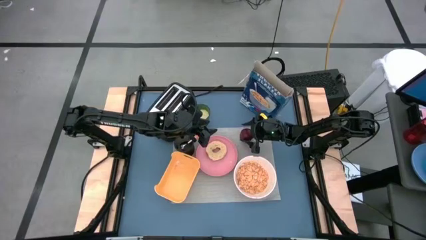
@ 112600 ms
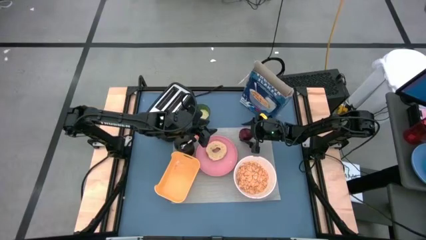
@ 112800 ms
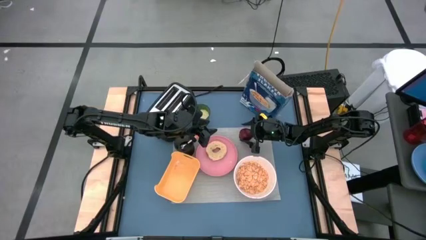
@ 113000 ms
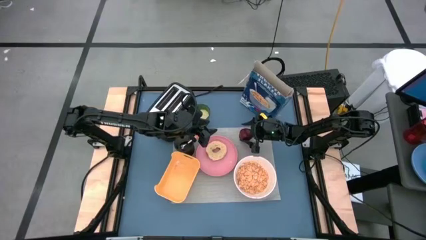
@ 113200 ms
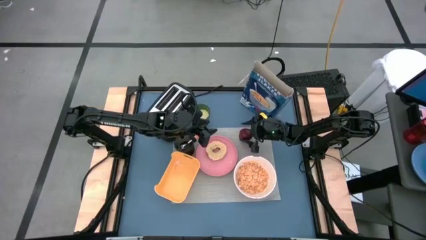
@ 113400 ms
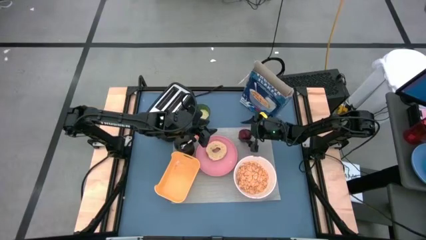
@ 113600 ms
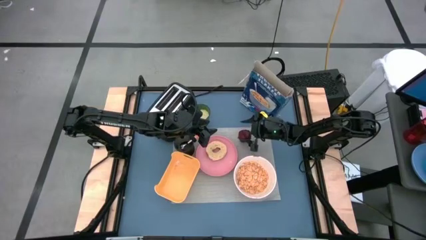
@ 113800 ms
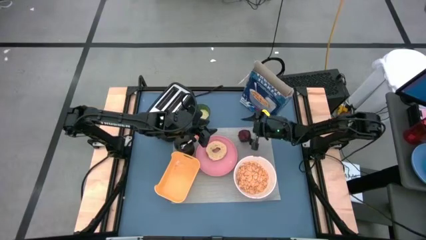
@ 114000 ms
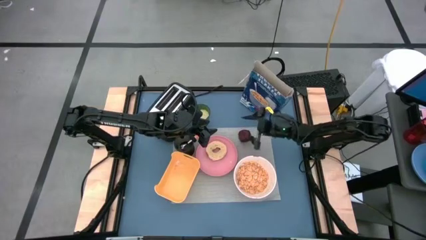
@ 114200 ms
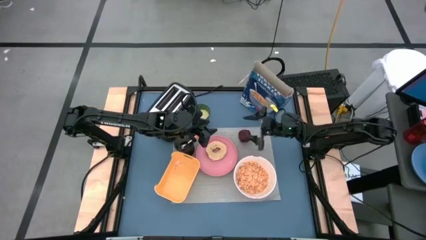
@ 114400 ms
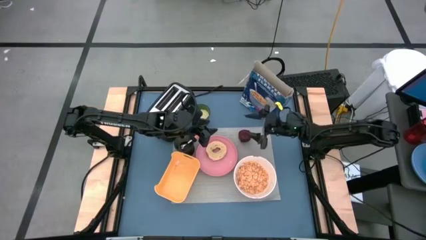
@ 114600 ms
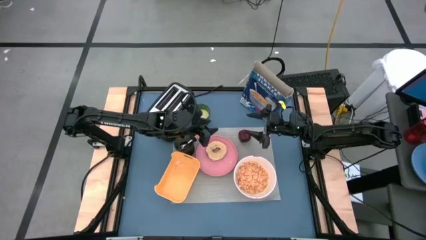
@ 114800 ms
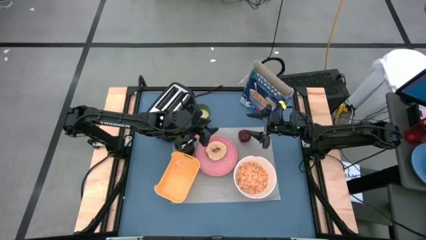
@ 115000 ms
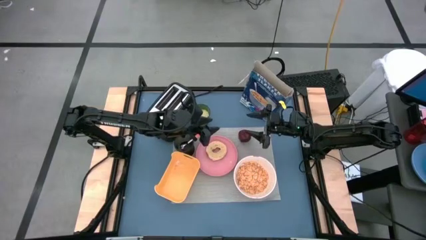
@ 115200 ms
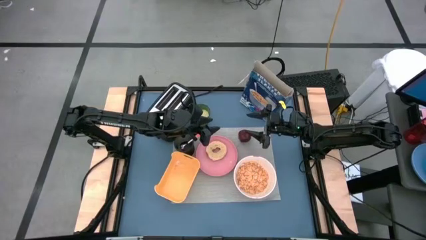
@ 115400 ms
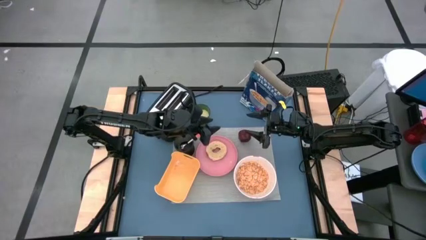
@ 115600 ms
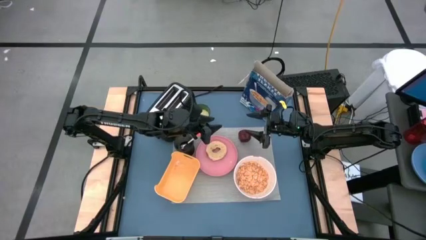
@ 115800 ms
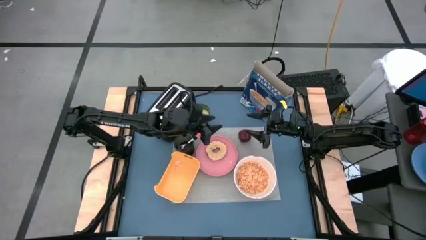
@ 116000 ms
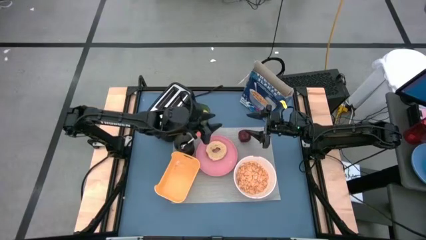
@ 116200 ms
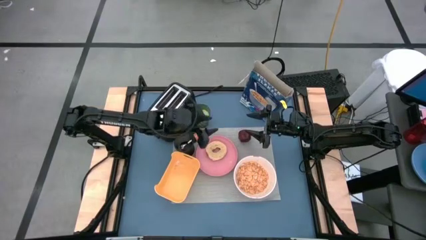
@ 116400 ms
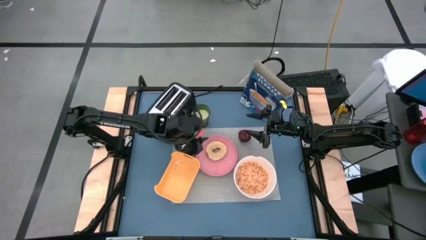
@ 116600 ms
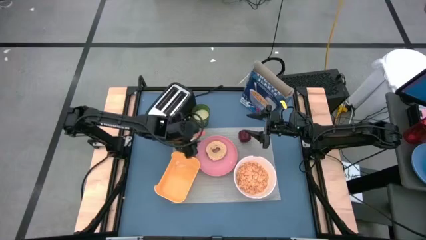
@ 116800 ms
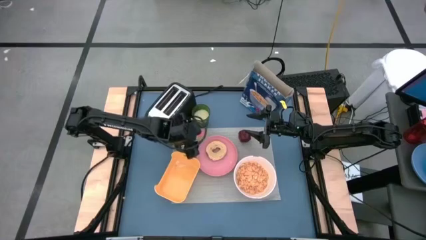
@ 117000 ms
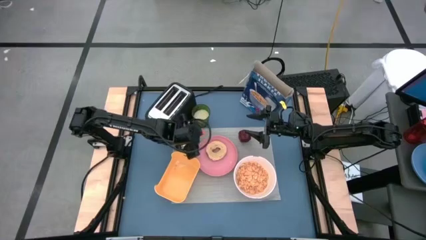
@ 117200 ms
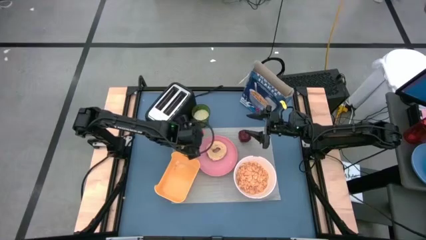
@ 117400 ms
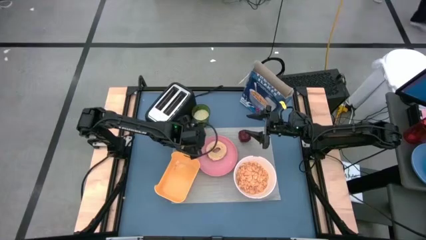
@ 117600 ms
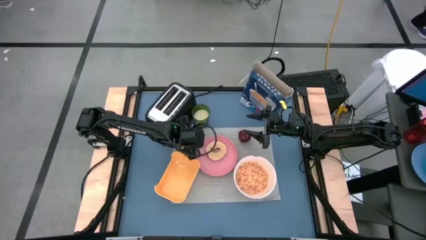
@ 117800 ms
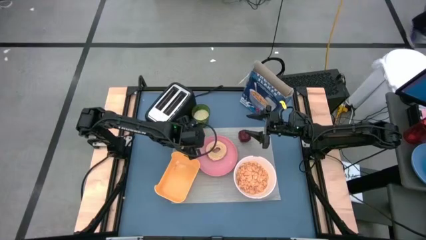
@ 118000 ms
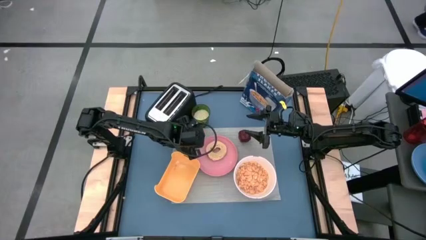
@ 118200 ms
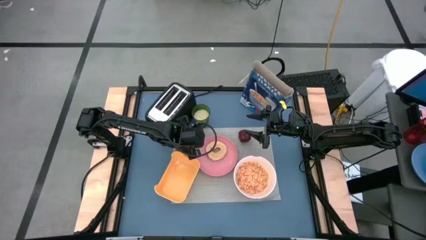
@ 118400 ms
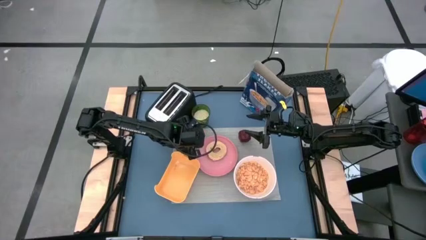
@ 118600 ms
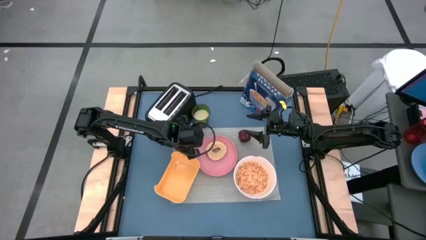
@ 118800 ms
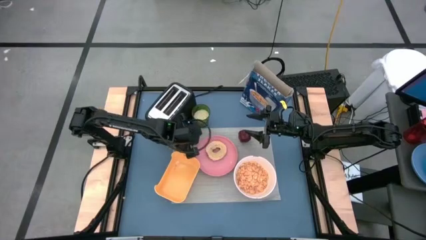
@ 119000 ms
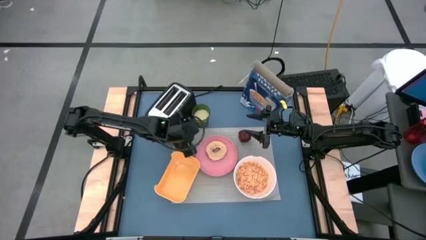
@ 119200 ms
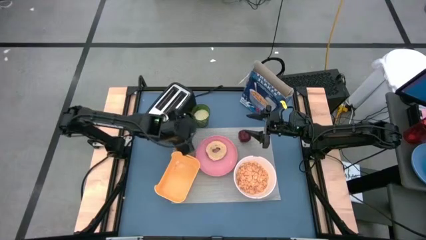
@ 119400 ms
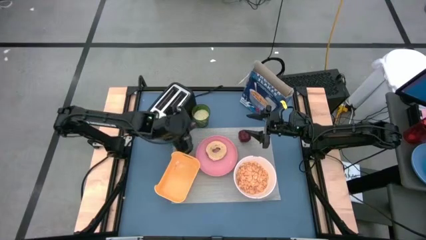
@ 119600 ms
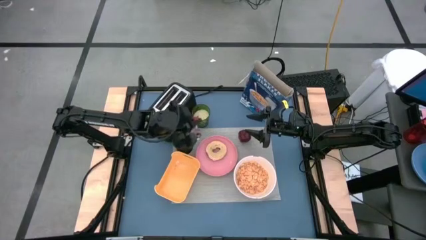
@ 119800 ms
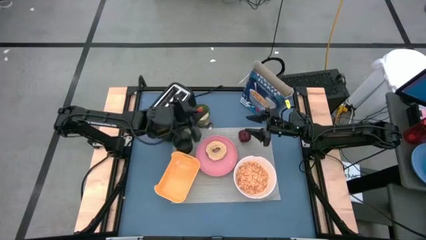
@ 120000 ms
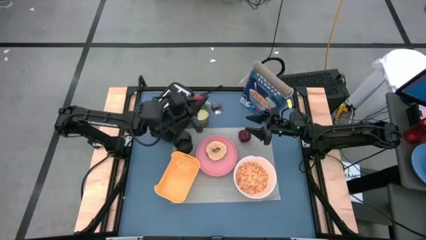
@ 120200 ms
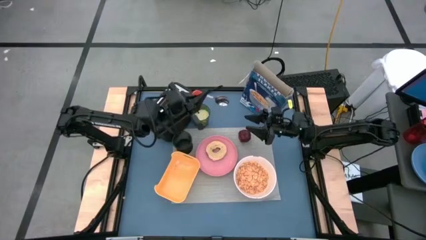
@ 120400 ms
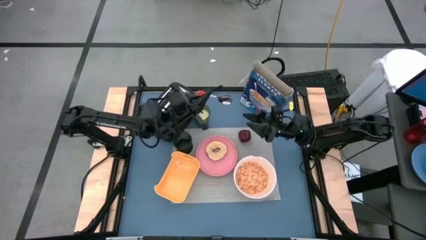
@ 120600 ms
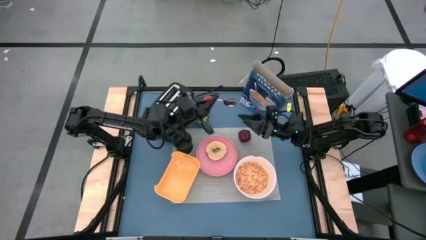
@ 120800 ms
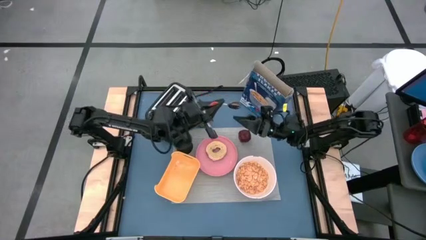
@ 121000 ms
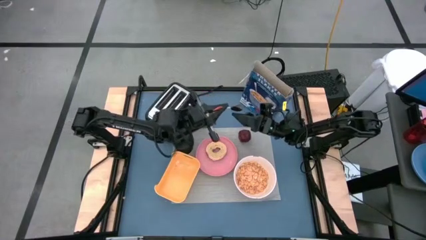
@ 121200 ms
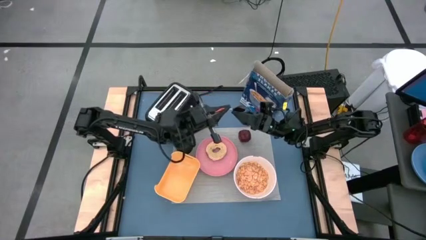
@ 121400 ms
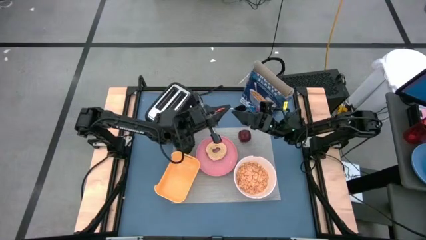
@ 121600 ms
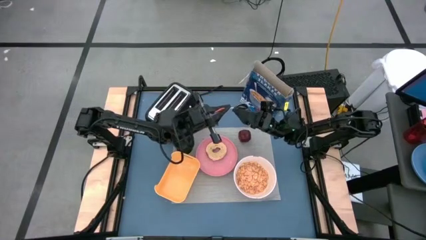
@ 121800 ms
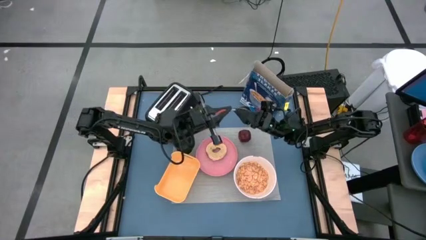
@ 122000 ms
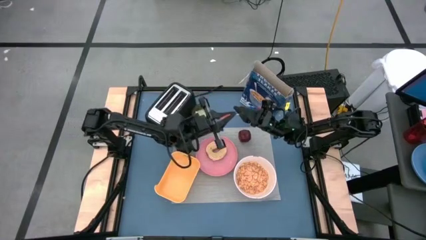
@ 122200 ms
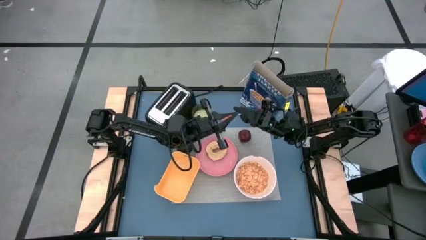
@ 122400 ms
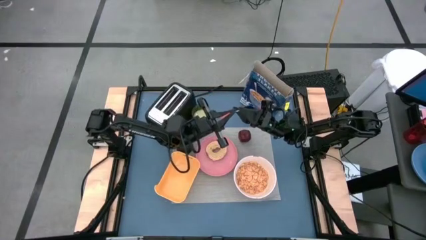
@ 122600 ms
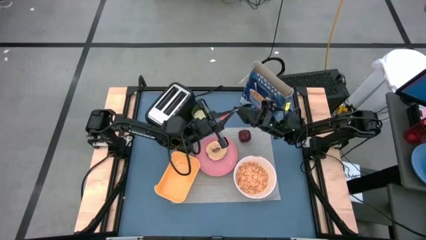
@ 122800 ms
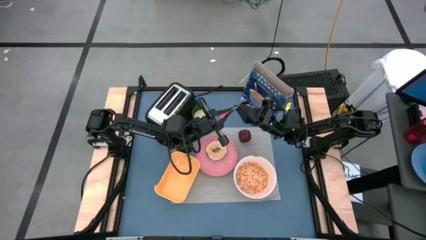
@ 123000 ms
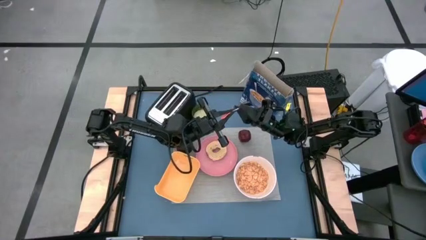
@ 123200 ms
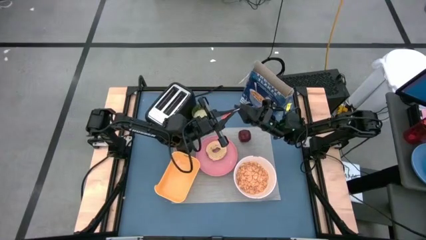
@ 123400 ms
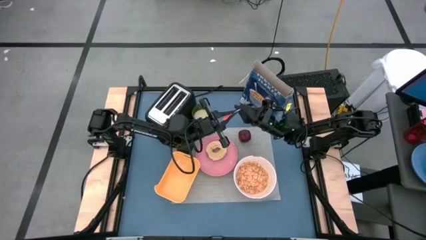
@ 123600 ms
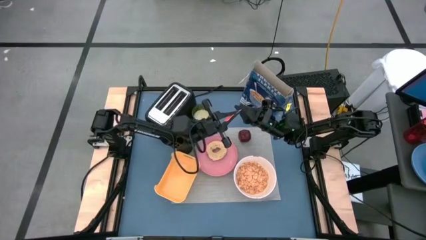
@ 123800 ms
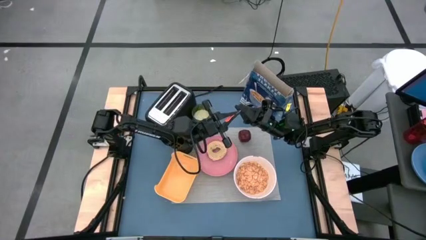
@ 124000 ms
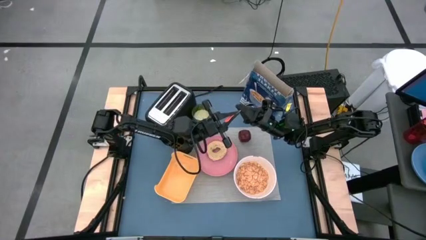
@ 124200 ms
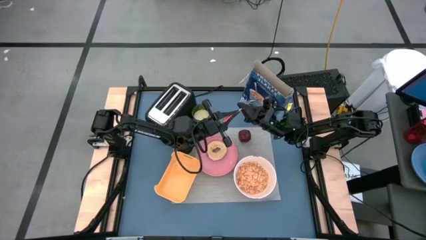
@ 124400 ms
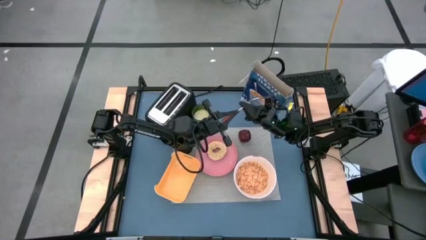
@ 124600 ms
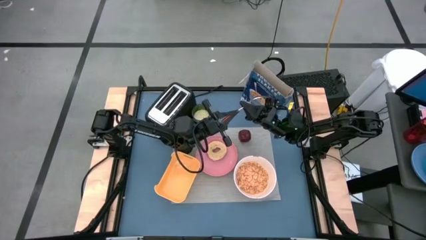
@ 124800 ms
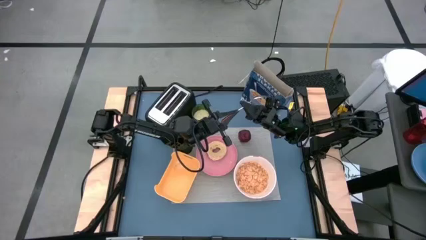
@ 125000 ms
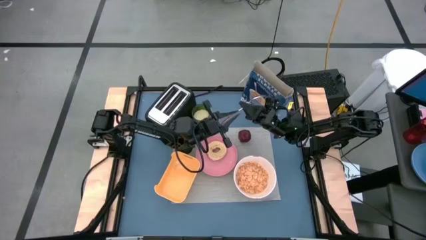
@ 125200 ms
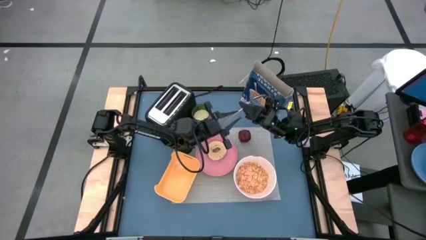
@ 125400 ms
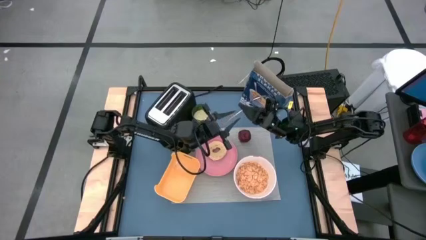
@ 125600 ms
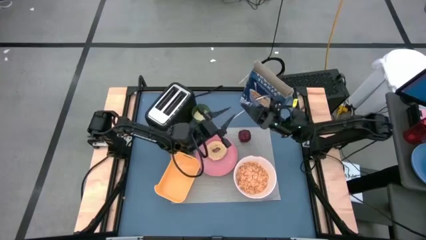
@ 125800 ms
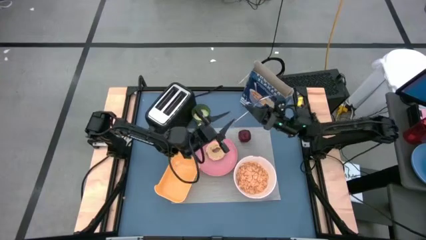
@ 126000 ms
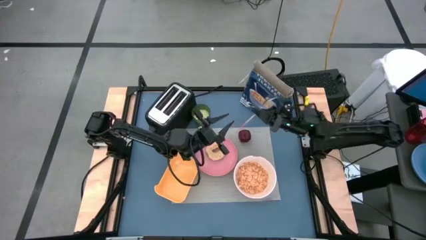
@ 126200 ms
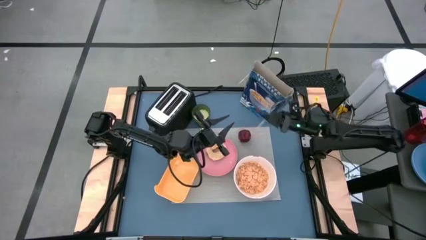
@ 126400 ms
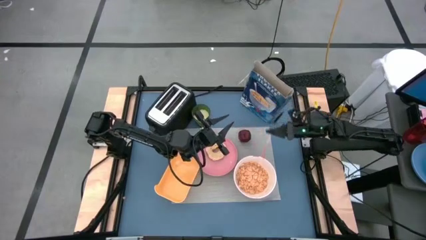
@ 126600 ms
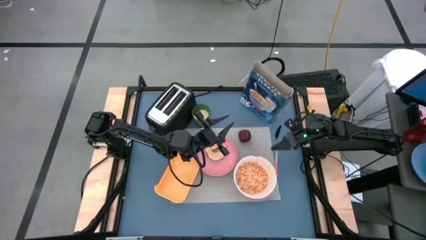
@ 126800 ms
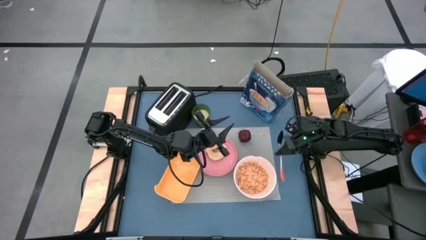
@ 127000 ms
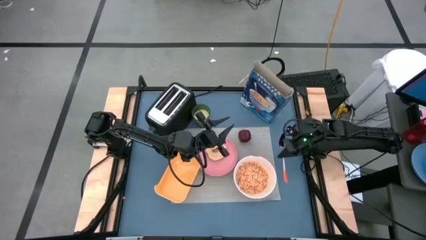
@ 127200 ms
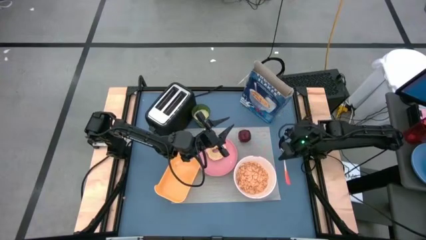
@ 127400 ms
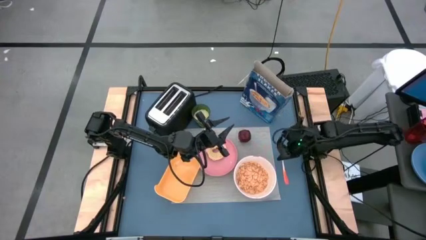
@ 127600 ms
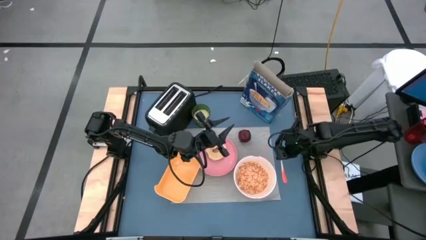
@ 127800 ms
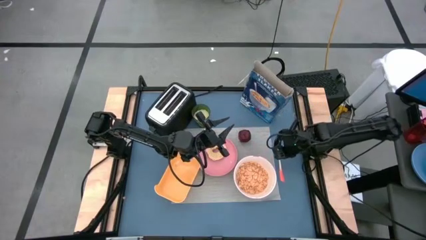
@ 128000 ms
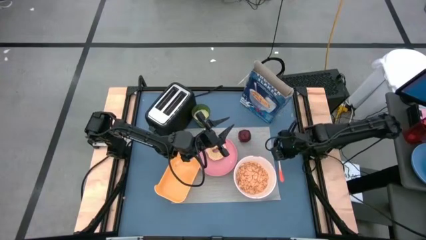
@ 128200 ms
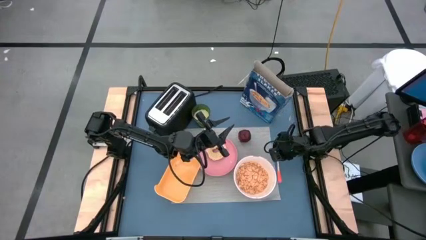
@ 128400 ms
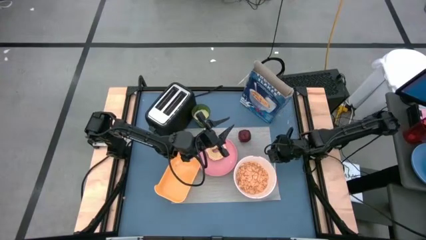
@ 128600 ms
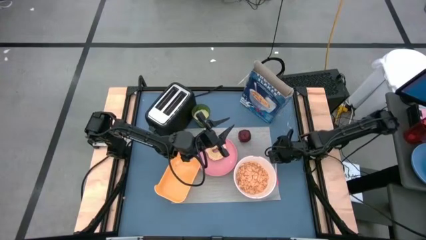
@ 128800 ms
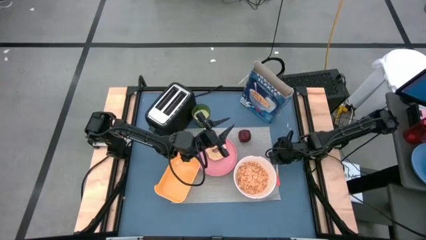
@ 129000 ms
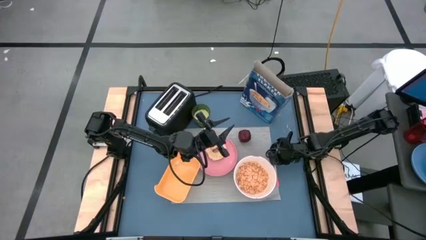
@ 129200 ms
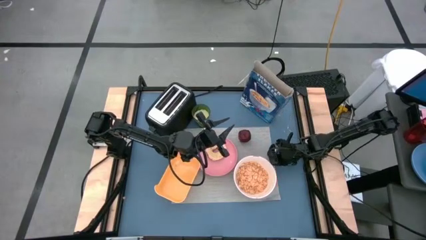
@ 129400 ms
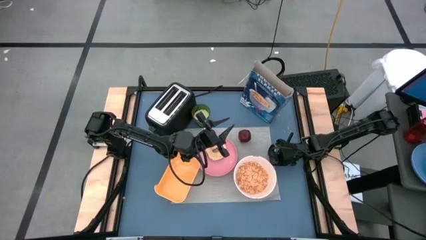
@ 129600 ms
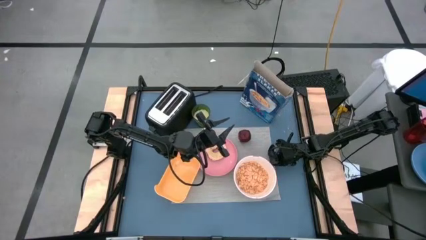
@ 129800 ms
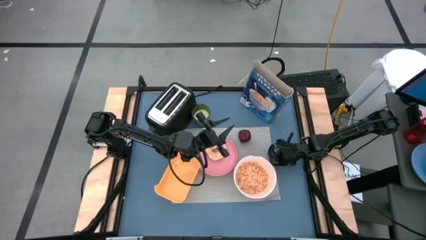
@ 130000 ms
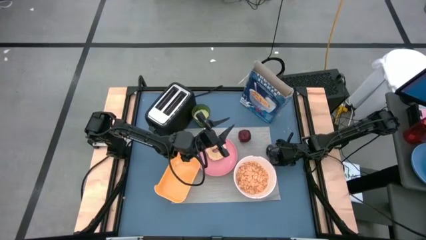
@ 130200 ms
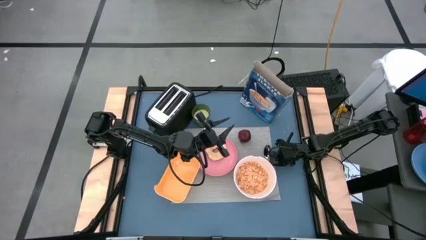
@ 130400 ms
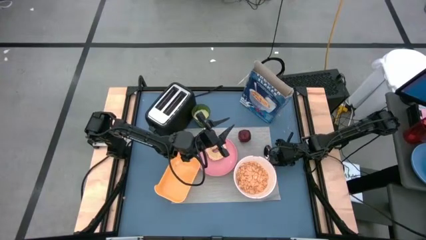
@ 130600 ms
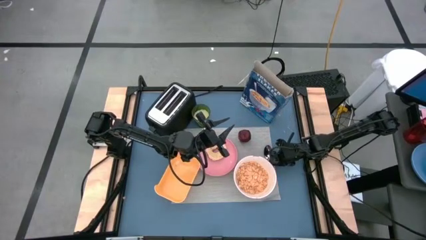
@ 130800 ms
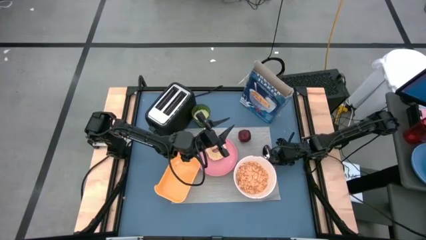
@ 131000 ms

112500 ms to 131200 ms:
Task: Arrange a breakfast setting
Put the orange spoon on the gray placemat
